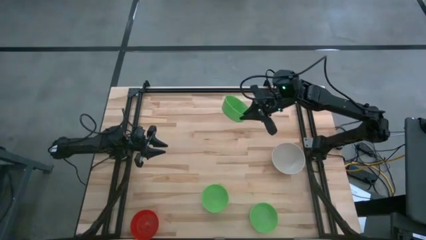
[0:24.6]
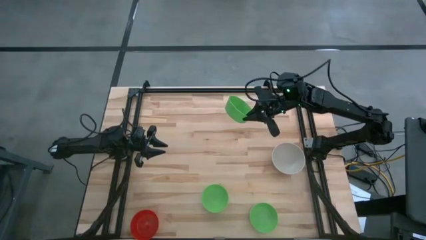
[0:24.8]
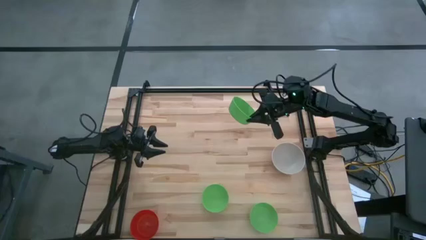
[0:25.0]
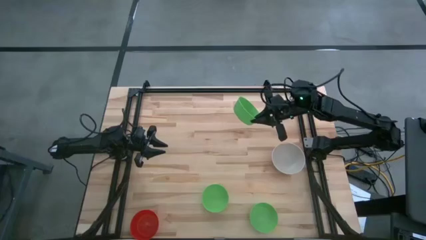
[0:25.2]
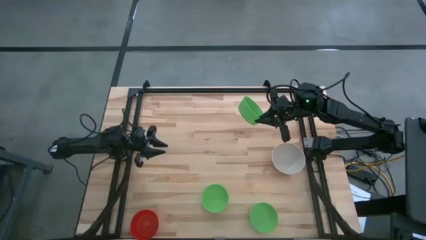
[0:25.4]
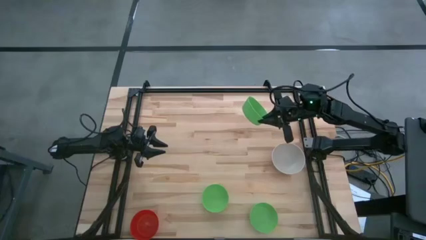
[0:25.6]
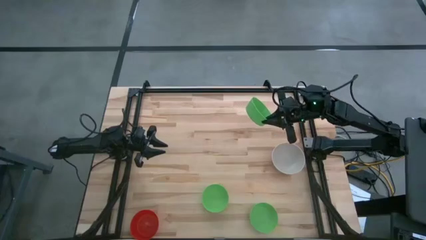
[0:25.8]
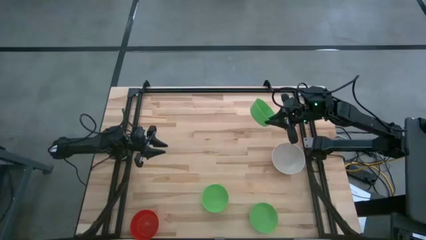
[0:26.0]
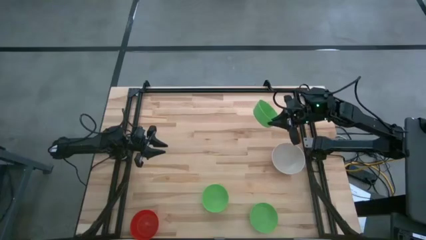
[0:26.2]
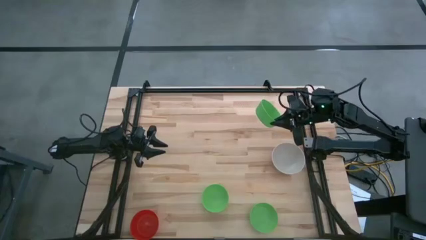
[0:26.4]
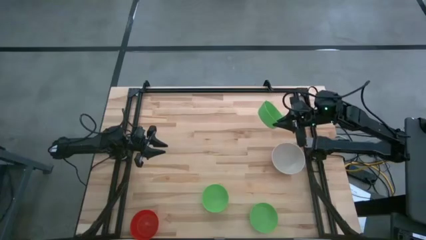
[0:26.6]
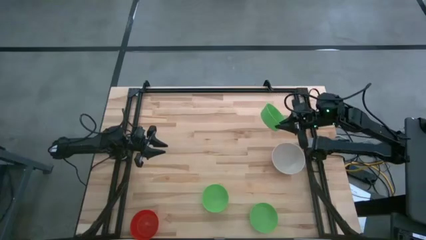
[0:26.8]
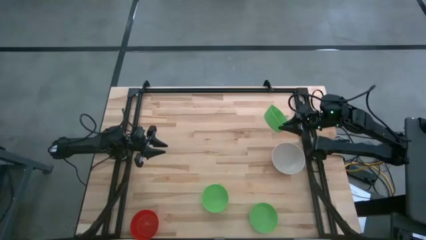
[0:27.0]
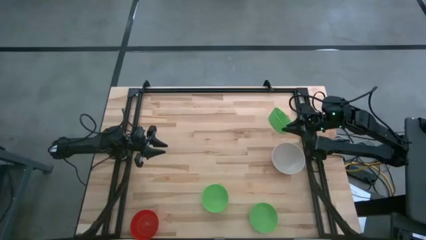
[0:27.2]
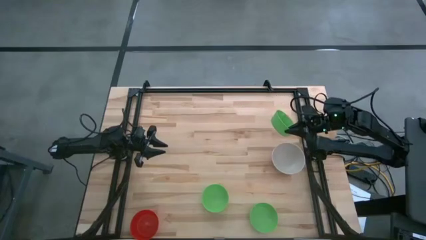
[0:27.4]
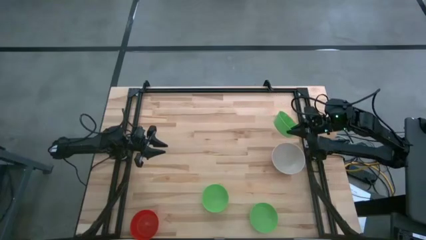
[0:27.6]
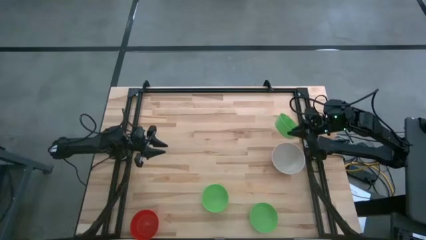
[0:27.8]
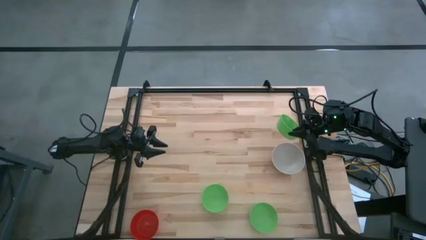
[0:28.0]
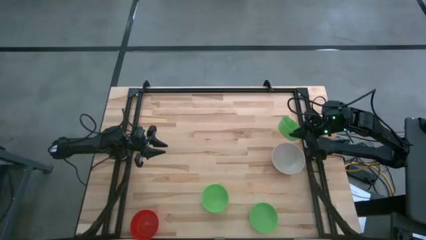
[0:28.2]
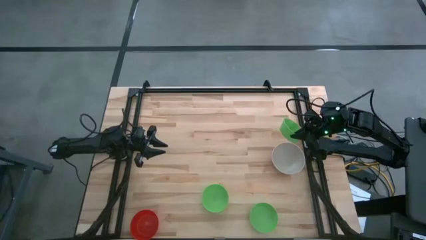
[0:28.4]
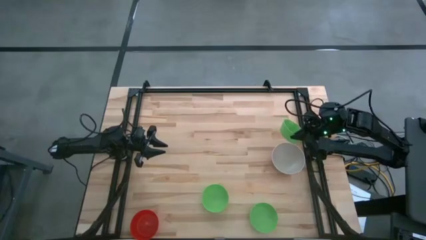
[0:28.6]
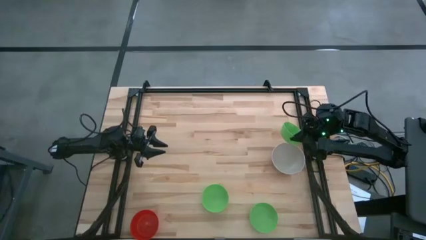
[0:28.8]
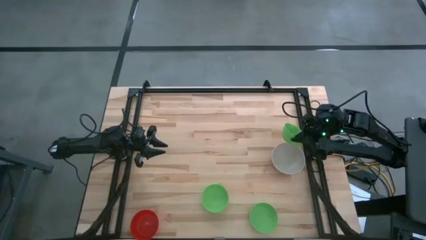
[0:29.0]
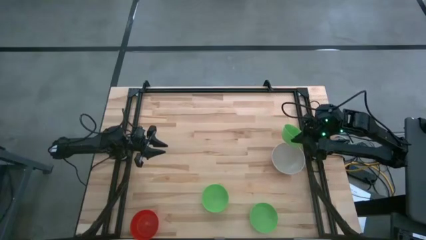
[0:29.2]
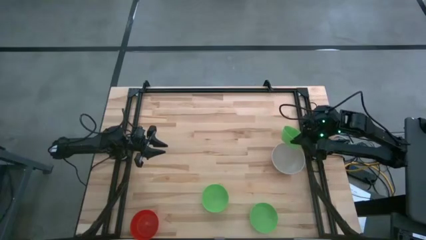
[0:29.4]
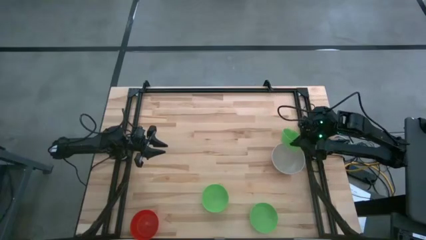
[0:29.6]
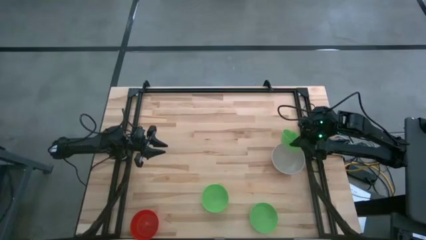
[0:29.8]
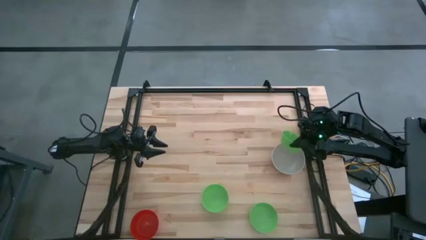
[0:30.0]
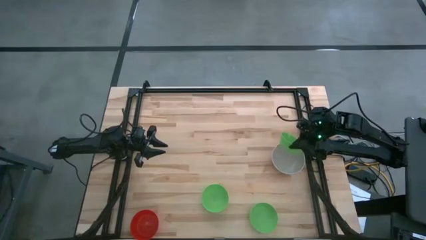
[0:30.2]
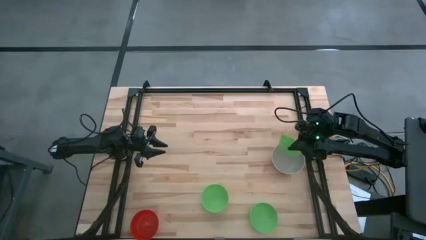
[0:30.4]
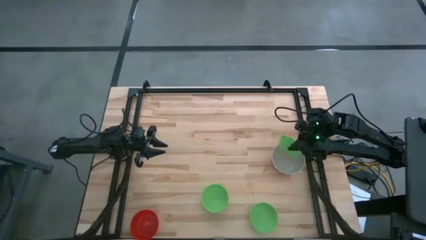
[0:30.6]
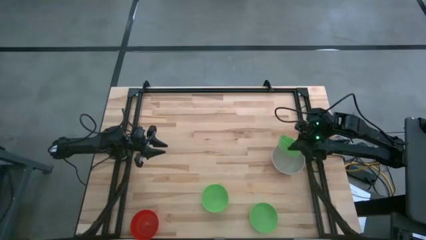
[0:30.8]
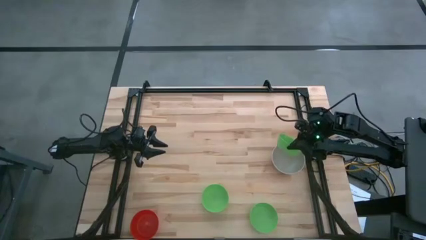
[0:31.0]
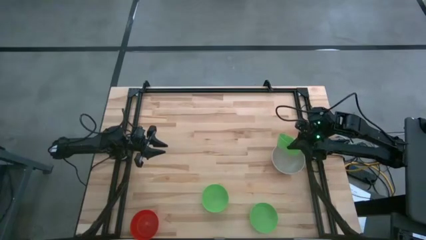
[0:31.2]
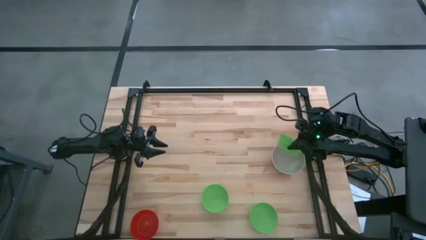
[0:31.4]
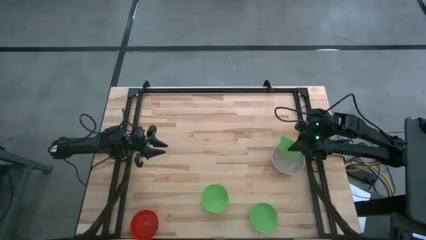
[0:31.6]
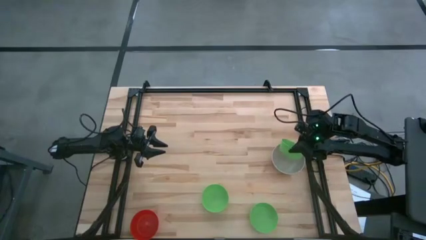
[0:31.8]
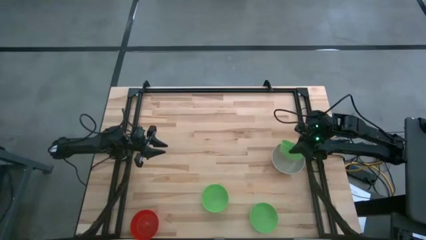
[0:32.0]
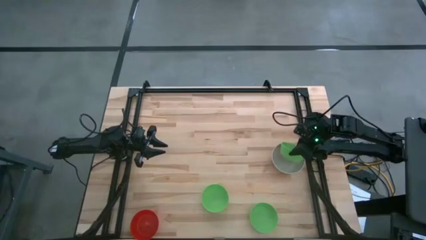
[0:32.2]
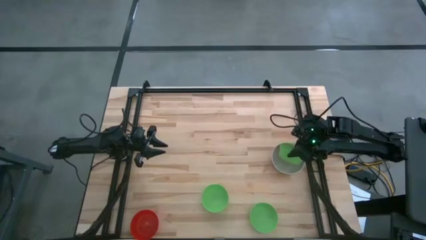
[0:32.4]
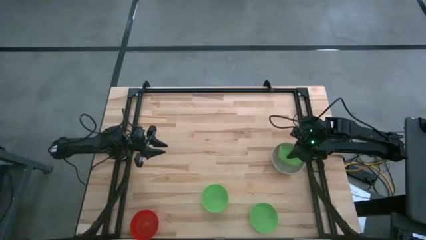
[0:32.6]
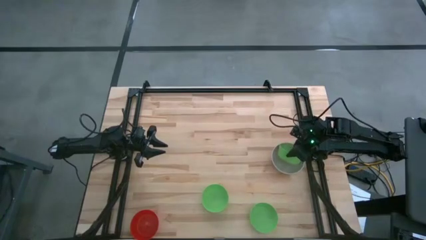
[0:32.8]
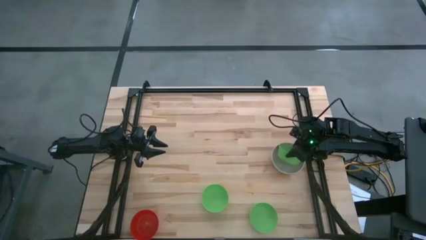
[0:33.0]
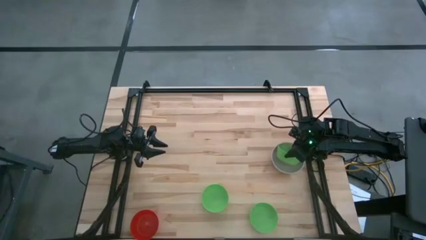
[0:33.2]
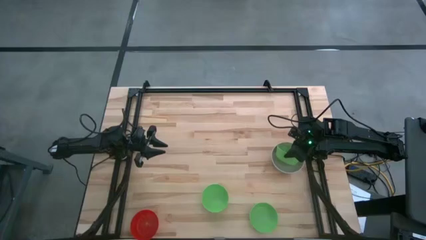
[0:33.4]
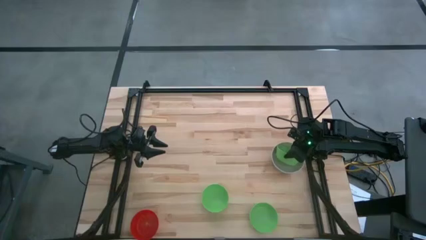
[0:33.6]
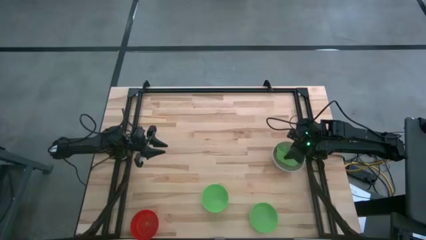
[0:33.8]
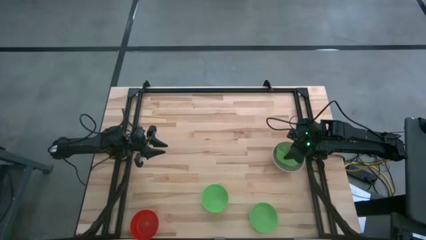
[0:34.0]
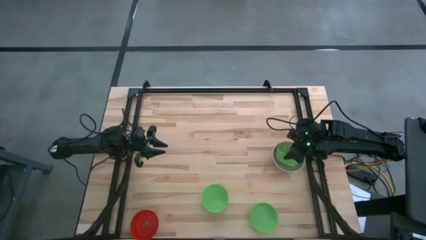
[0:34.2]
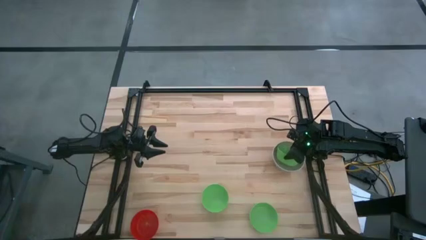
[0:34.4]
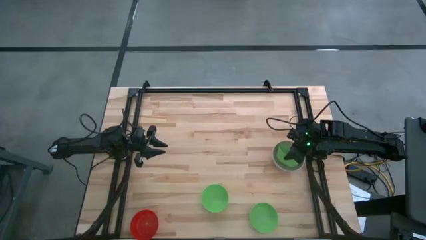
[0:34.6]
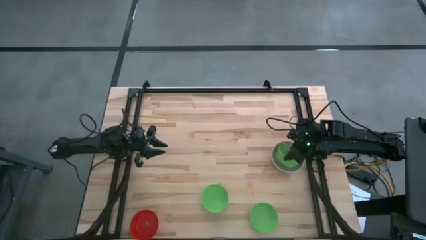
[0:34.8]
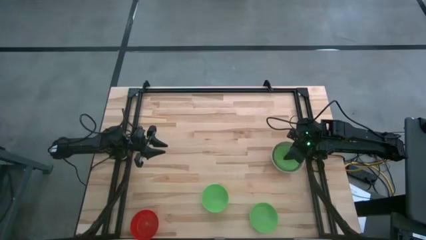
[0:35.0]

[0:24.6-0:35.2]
Stack the top green bowl on top of the white bowl

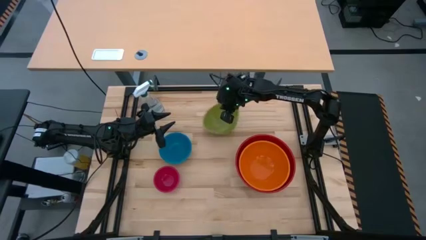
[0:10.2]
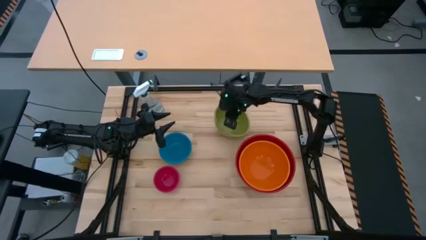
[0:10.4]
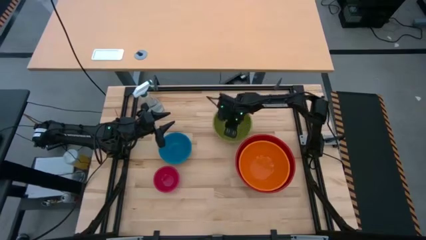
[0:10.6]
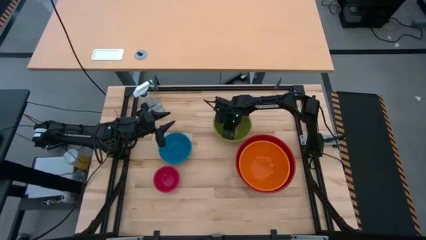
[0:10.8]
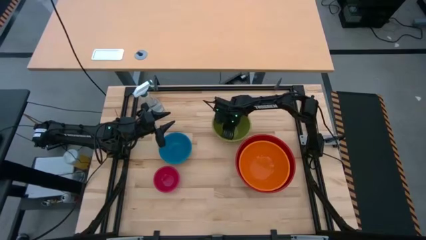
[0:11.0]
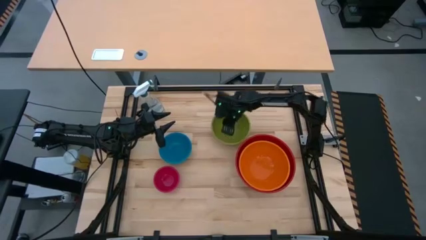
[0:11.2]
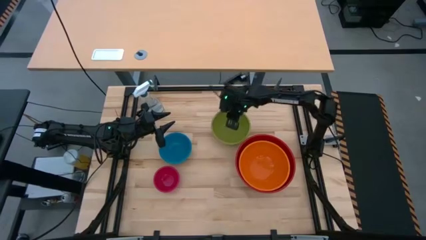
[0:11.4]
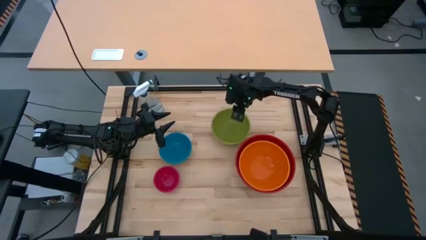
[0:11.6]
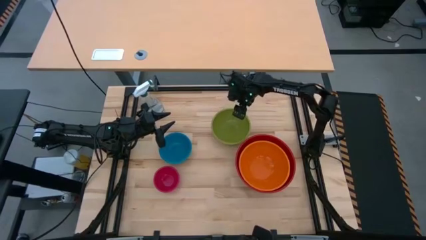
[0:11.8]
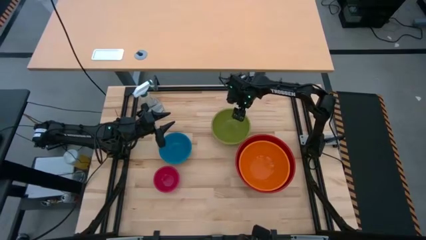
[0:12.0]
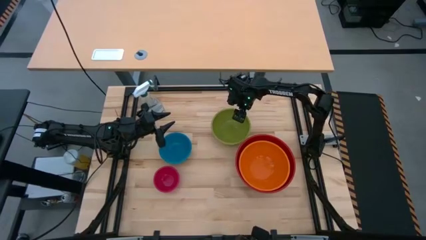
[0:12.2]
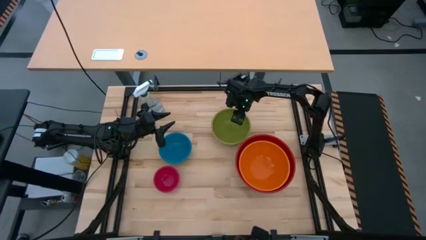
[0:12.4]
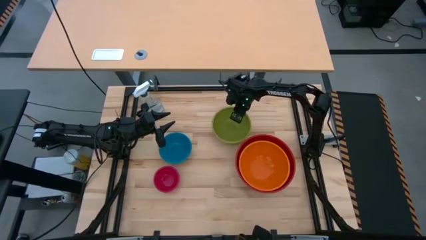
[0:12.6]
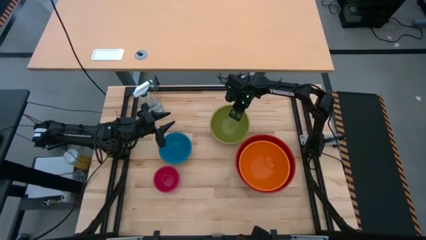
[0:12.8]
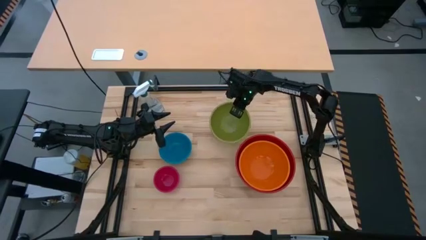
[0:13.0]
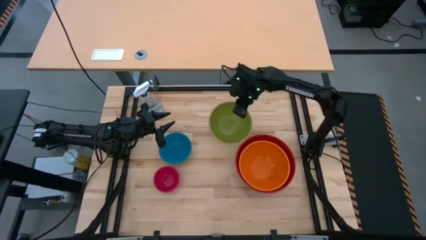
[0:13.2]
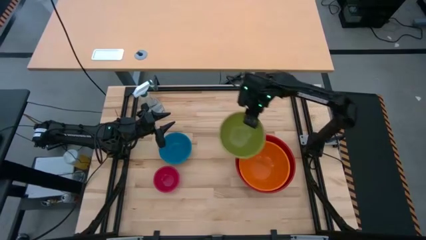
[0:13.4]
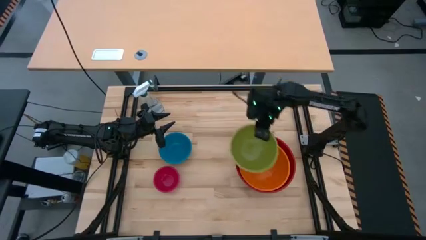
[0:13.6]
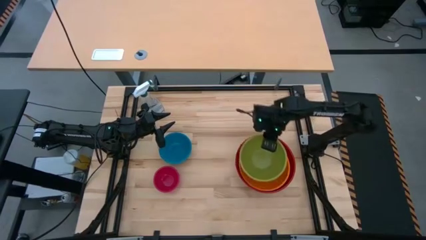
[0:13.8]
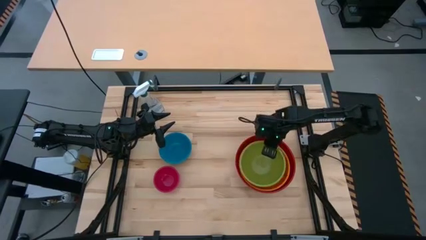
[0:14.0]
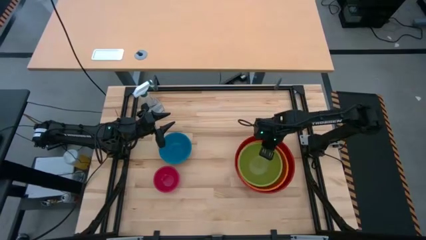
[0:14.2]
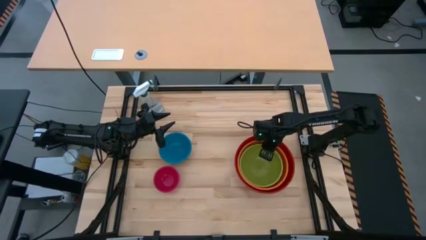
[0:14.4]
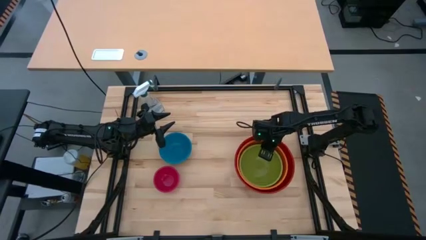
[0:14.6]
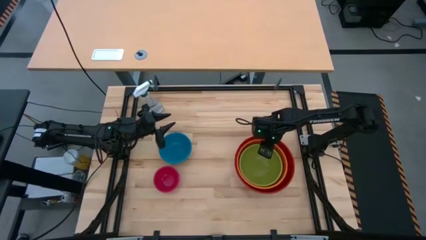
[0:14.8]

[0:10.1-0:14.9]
Stack the green bowl on top of the orange bowl

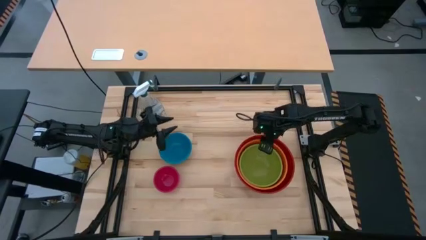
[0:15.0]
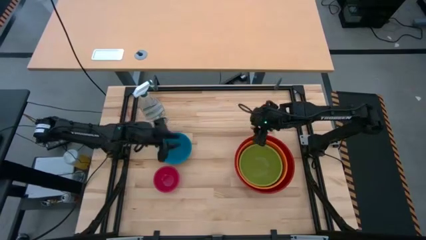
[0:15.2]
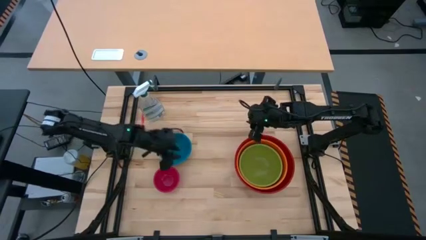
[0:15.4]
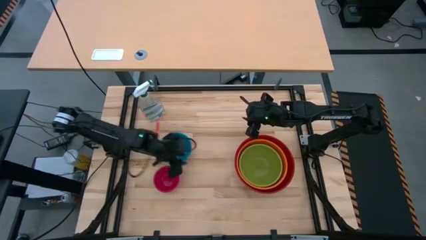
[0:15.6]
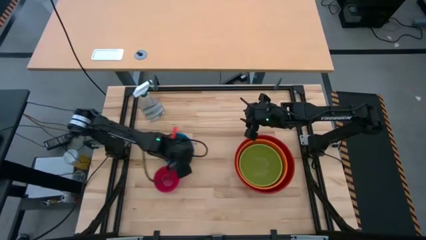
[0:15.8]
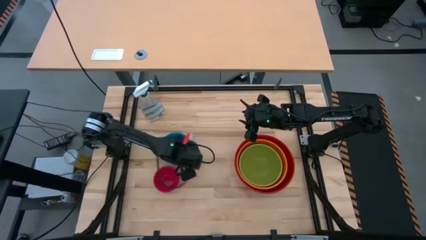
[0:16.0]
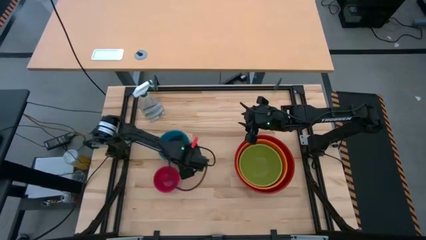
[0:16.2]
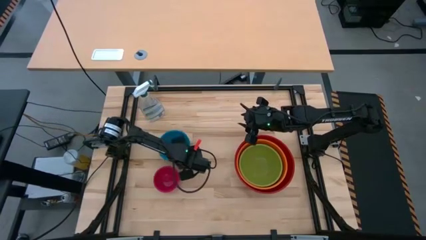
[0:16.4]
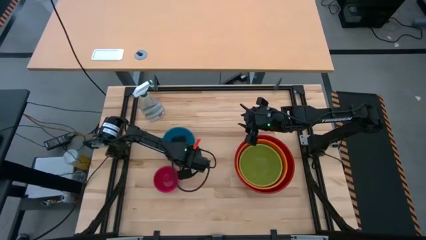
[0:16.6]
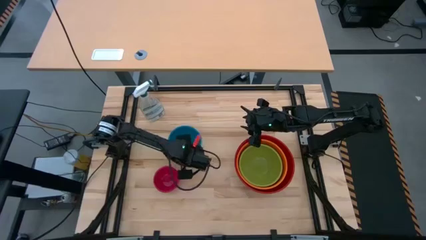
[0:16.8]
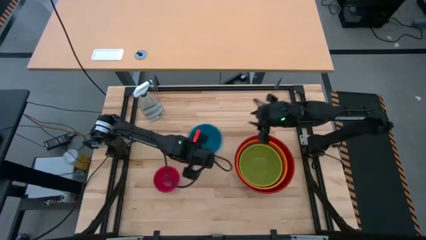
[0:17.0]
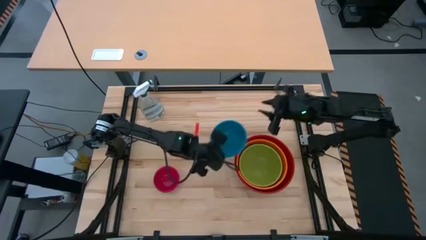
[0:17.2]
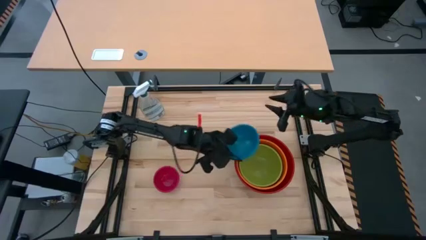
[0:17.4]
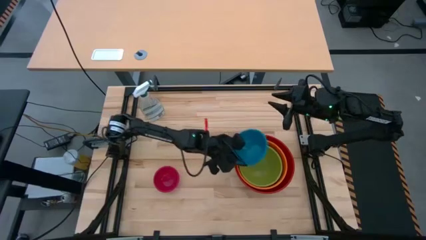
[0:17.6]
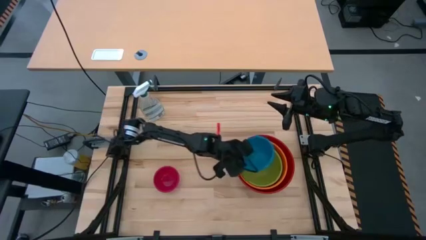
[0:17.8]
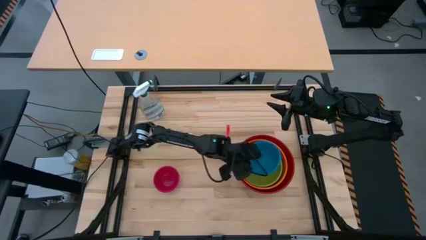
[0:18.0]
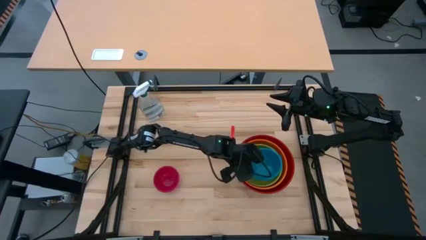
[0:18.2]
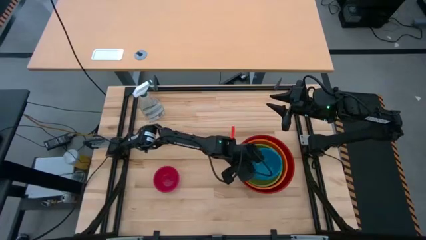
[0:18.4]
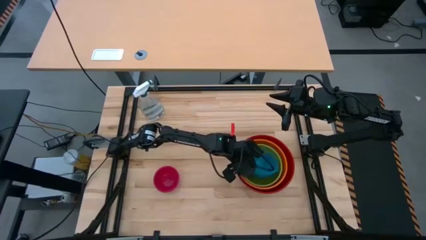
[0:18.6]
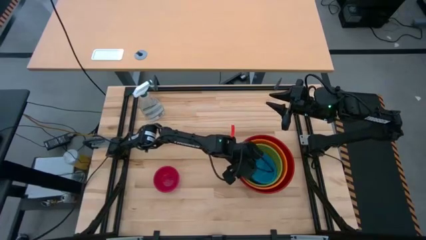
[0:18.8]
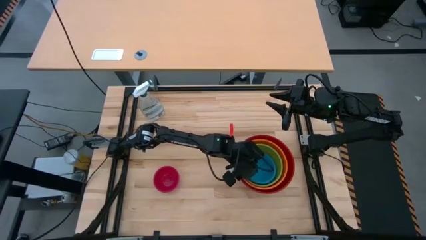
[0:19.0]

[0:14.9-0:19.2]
Stack the blue bowl on top of the green bowl
